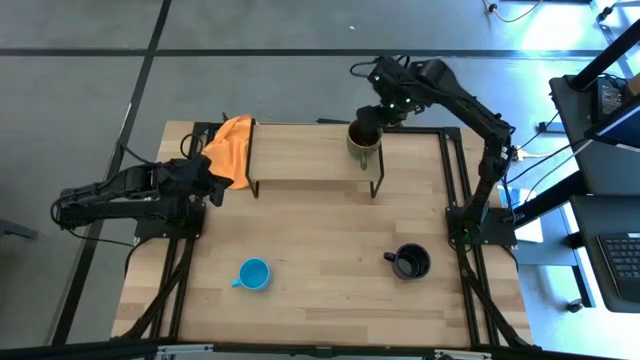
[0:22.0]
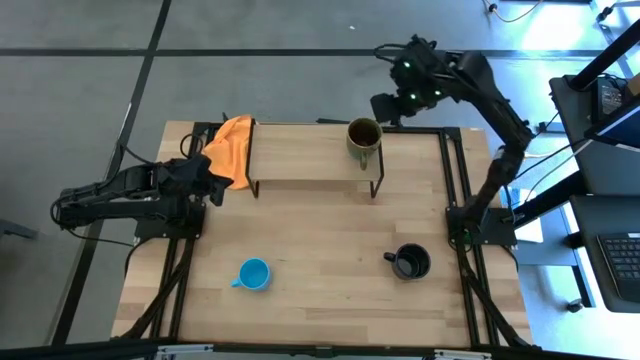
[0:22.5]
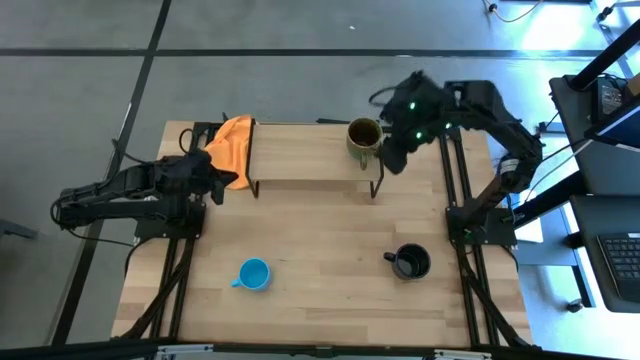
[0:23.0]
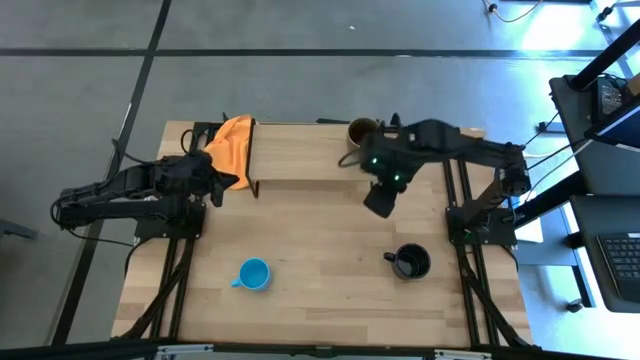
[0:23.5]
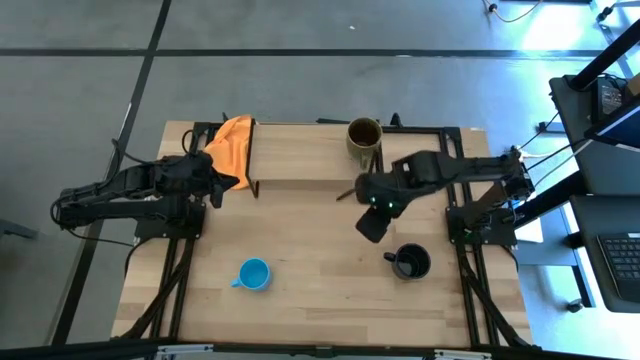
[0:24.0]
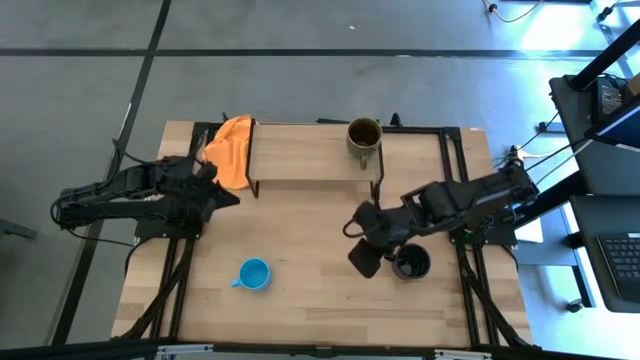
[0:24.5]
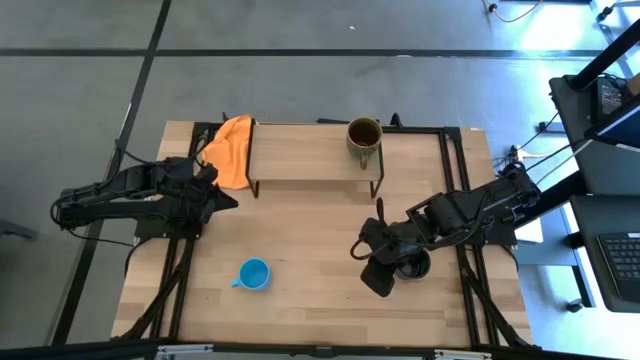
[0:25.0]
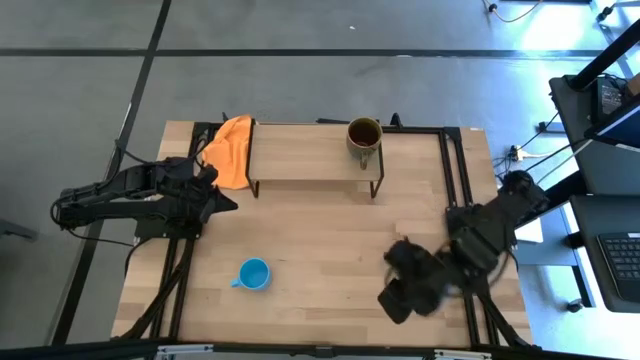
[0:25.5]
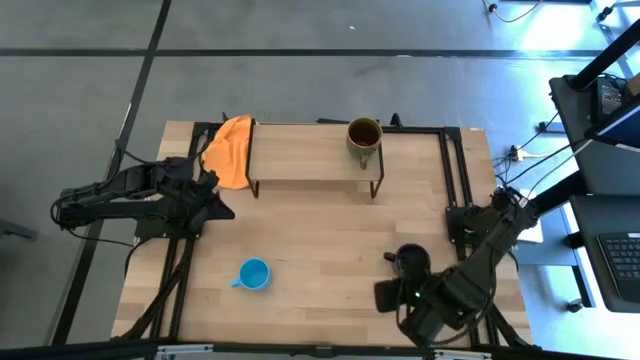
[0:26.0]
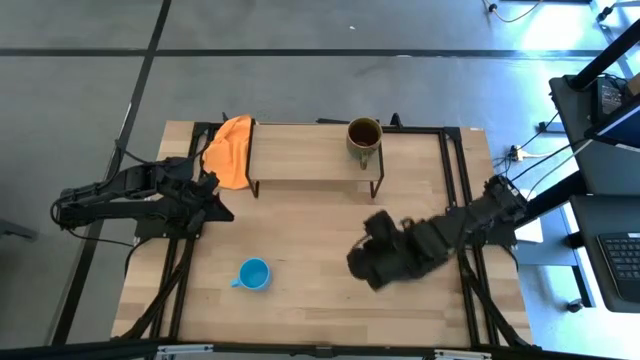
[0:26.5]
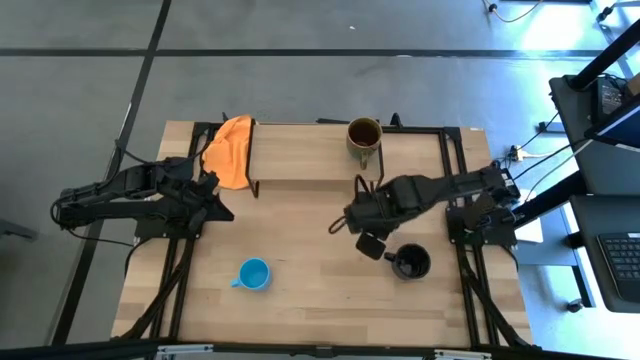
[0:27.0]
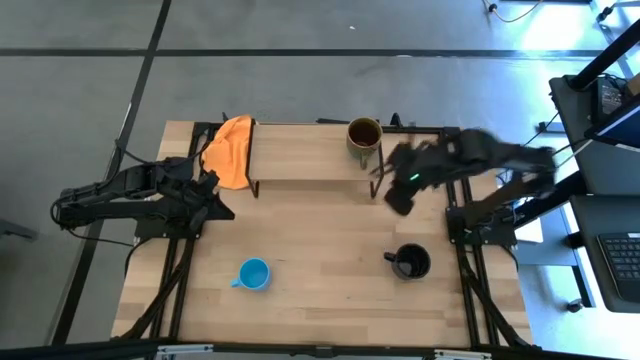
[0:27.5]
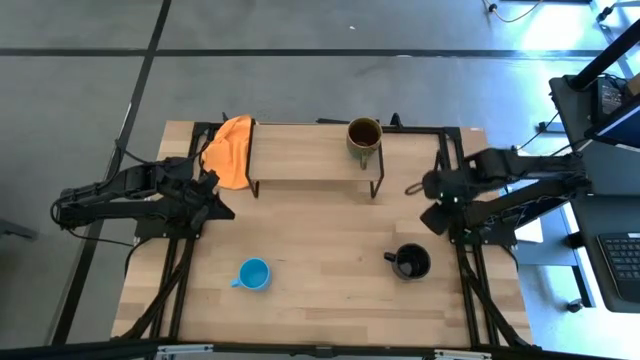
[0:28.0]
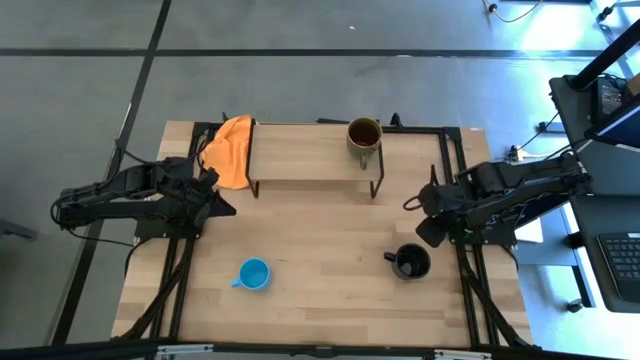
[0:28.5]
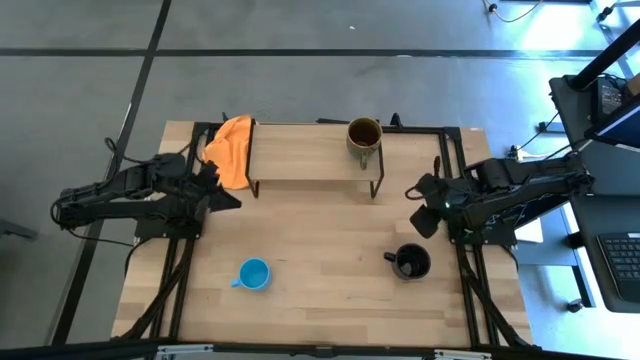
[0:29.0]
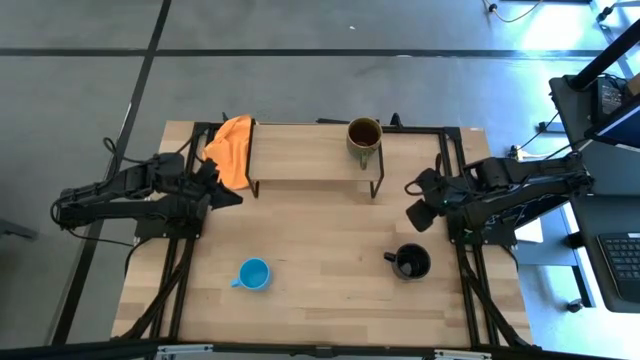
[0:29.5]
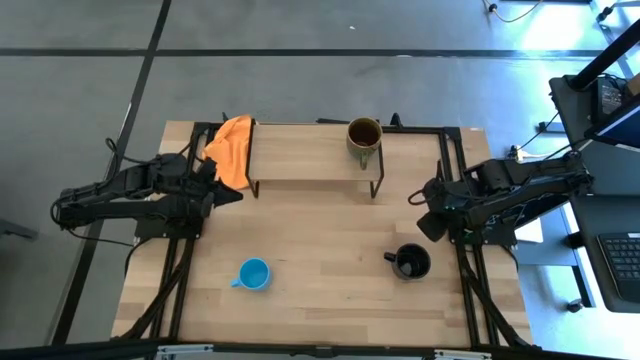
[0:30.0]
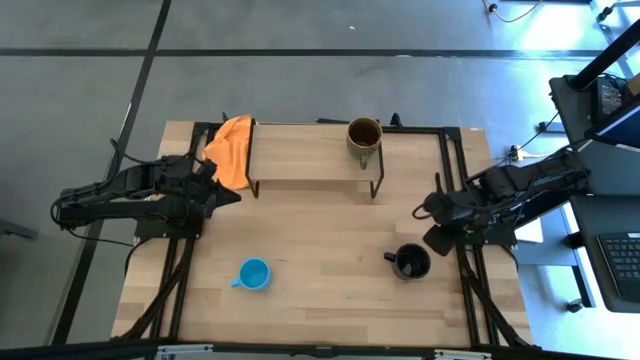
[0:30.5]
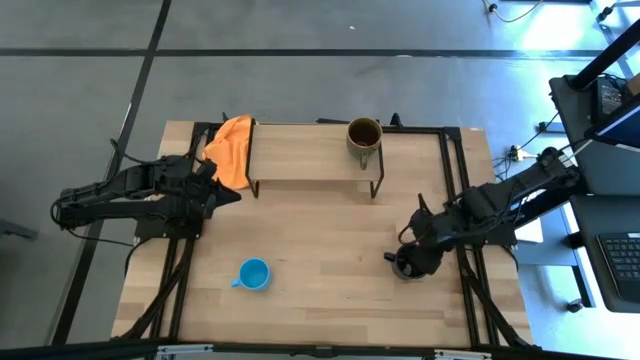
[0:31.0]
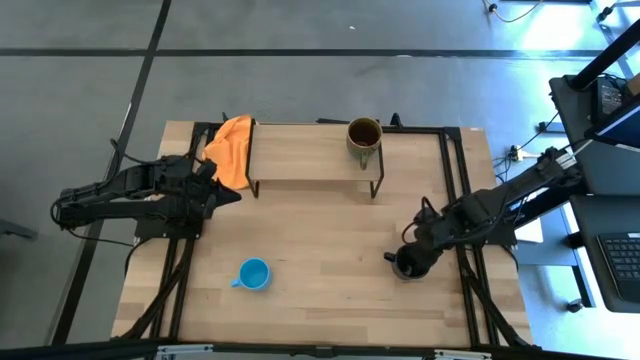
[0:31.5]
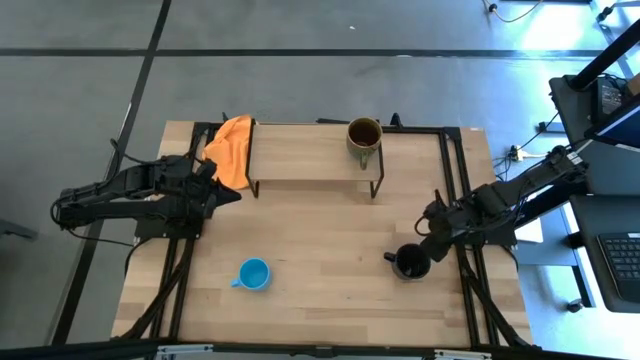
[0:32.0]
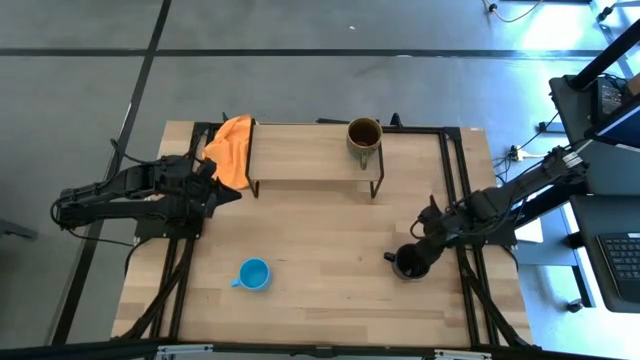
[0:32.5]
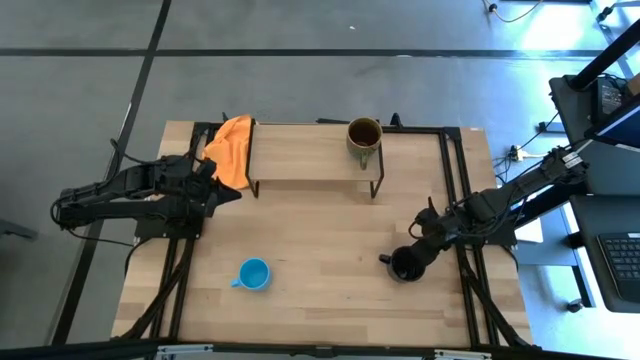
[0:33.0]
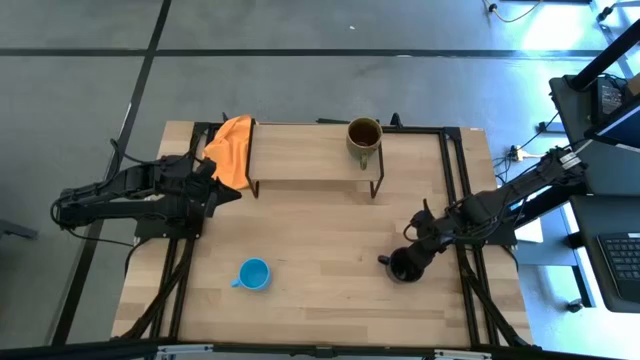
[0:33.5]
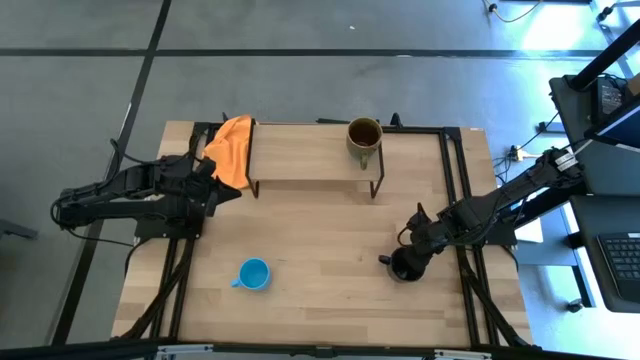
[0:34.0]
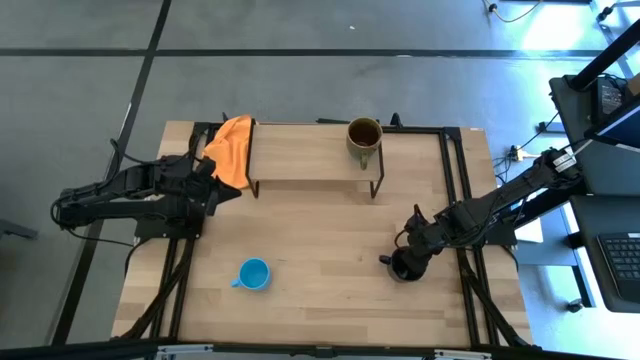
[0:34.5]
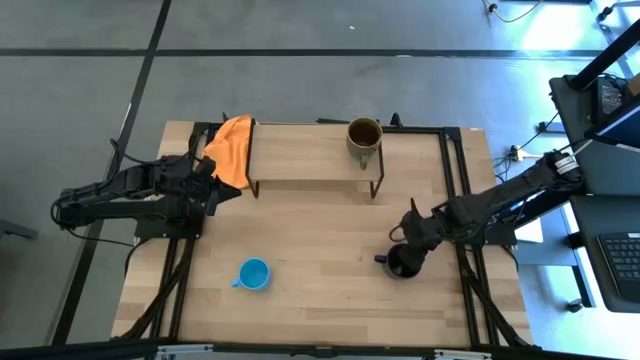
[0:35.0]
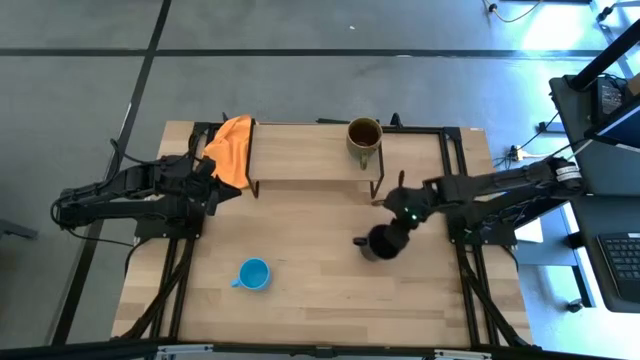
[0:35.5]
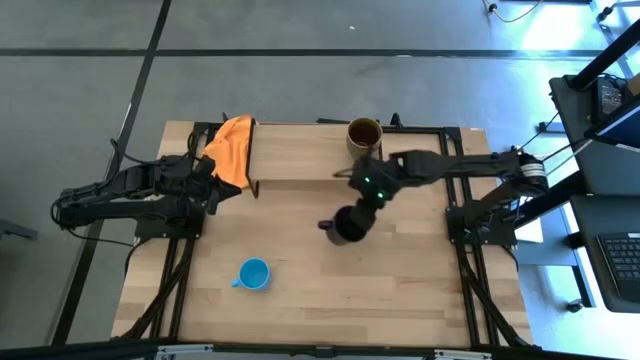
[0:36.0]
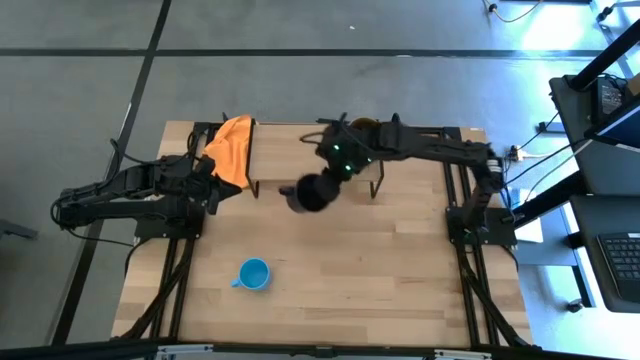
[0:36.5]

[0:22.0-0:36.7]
Task: Stack small to large cups/mugs on shelf
Put the dark blue mug on the shelf

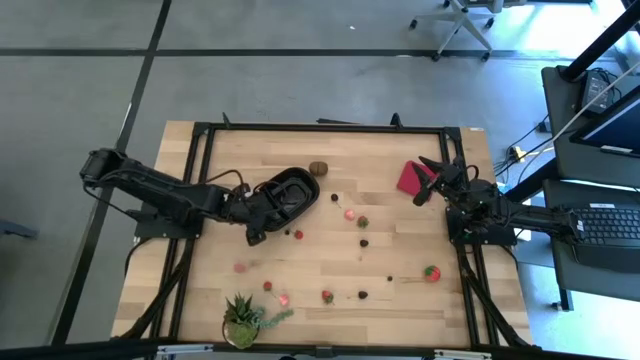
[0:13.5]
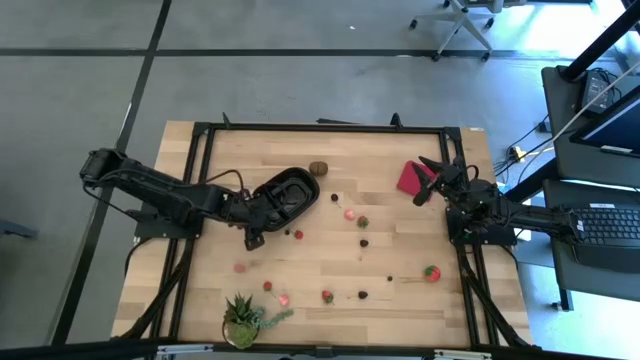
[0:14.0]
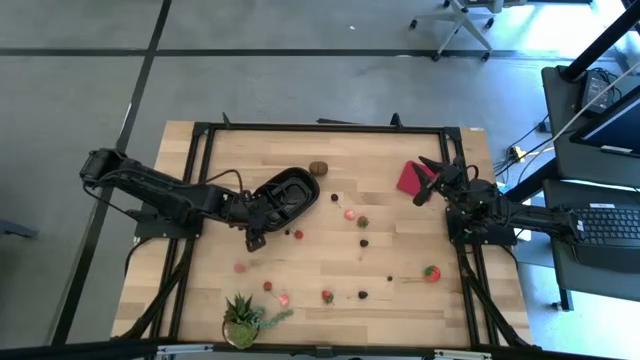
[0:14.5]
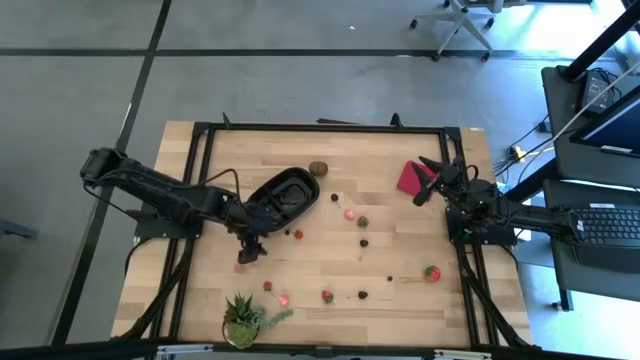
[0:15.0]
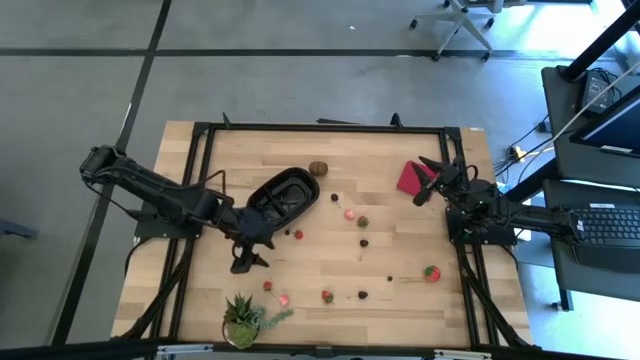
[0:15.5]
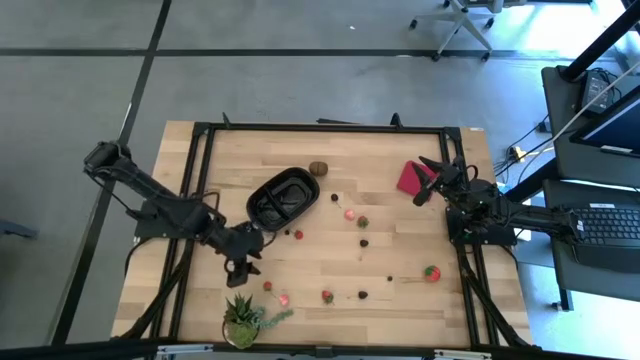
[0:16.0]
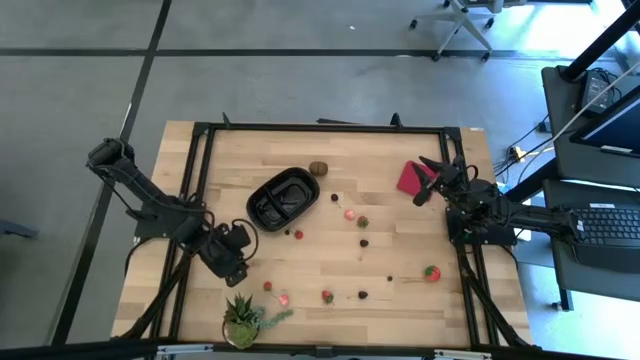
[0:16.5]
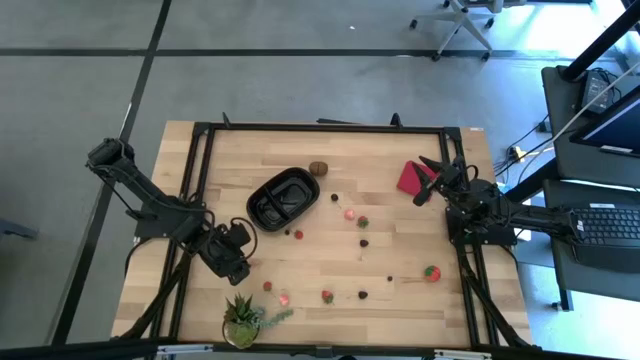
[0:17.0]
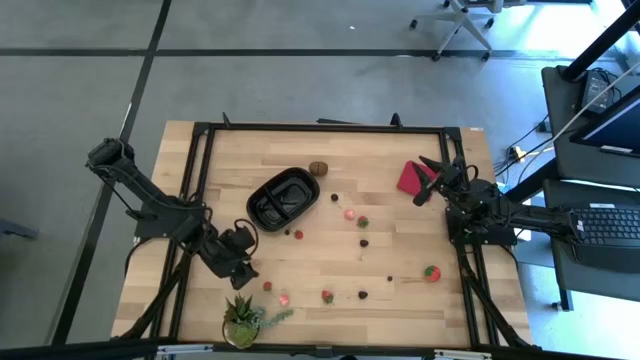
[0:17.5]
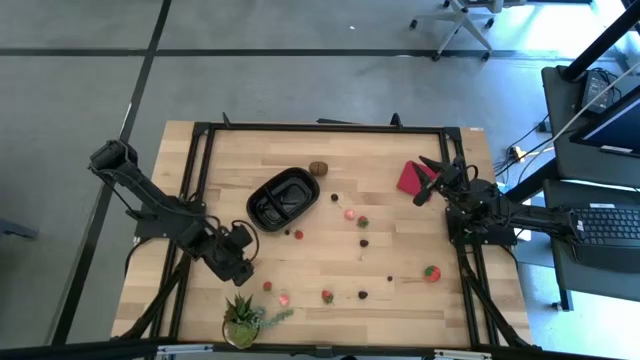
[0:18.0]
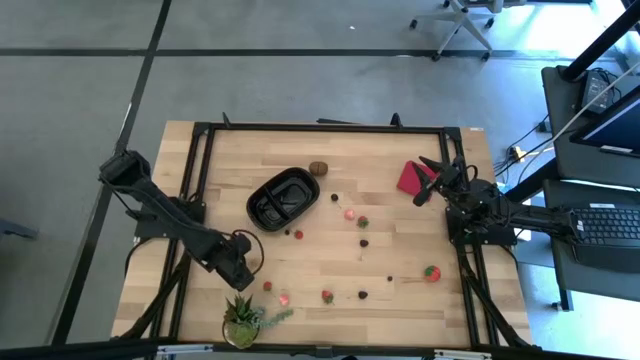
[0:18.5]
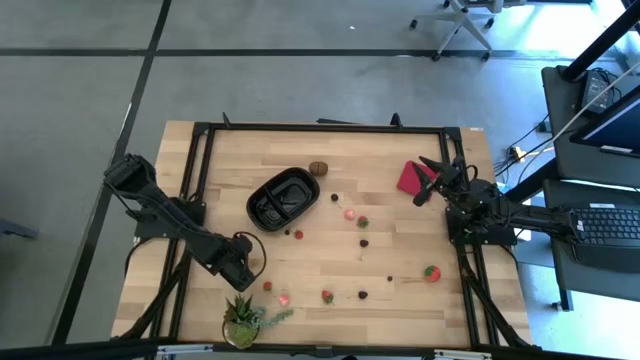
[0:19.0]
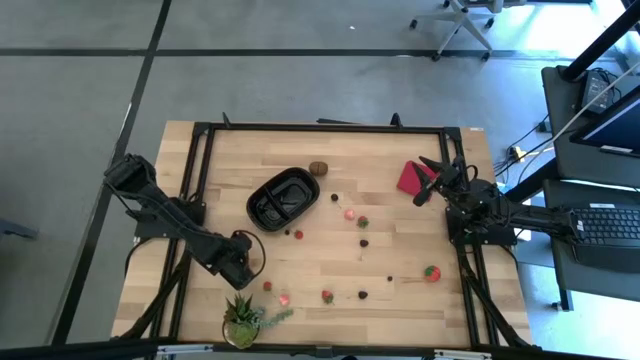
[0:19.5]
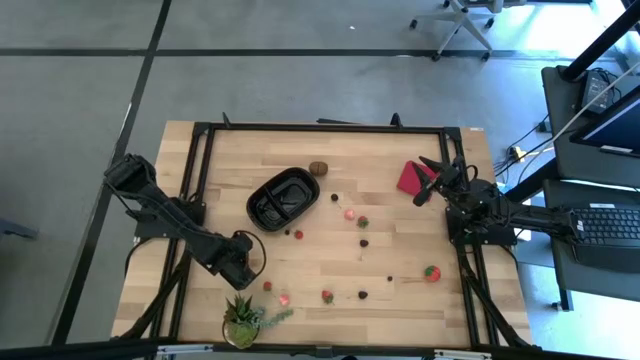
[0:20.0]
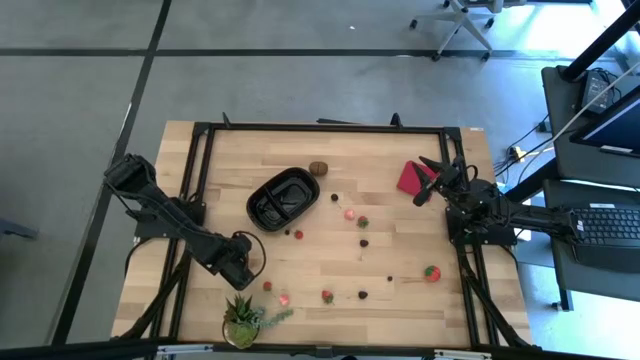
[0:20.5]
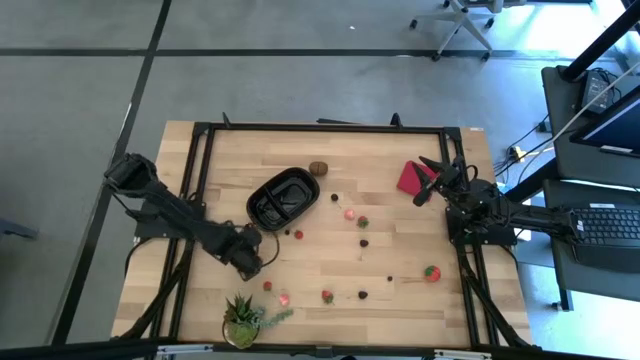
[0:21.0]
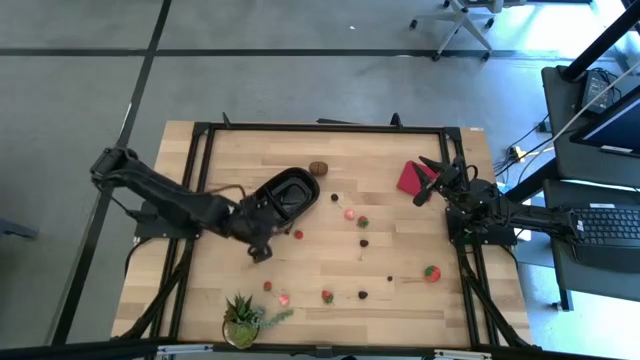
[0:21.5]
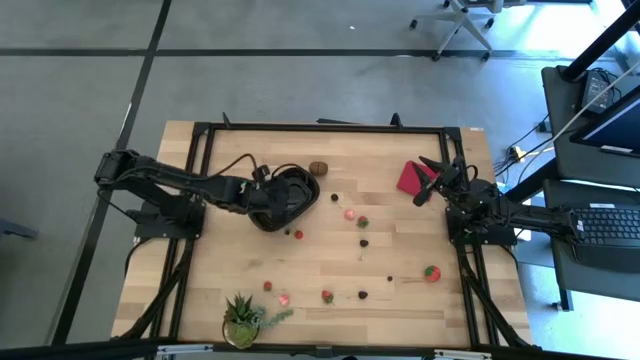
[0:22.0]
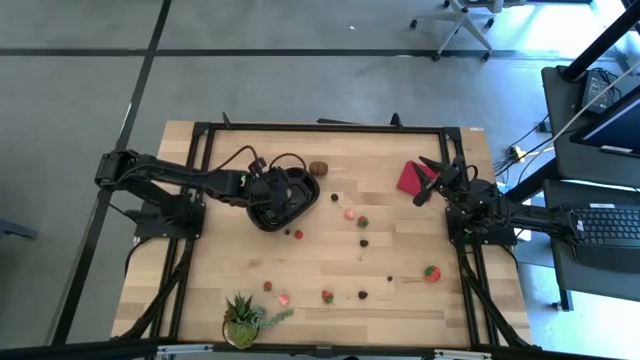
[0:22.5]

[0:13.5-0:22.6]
Task: Pick and placing Produce into tupperware
Put the pink peach into the black bin
